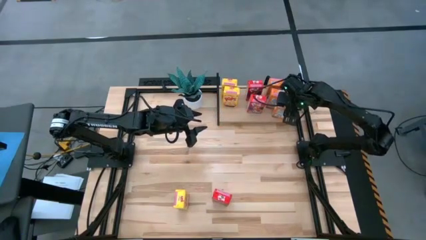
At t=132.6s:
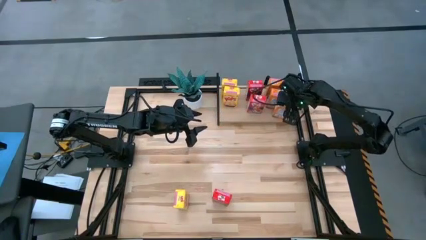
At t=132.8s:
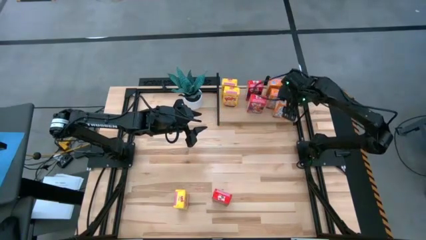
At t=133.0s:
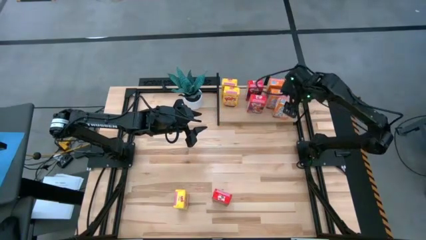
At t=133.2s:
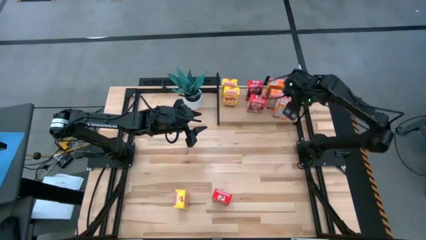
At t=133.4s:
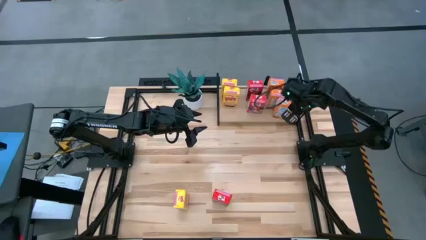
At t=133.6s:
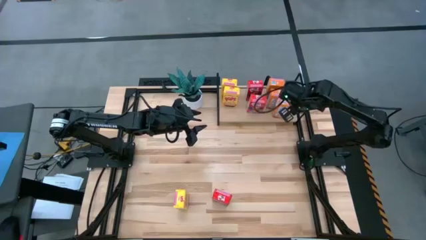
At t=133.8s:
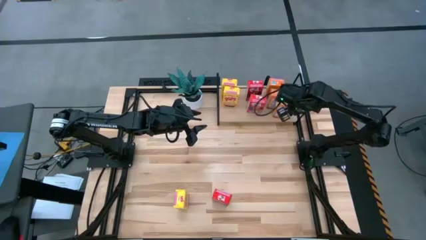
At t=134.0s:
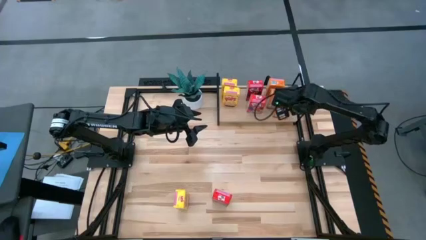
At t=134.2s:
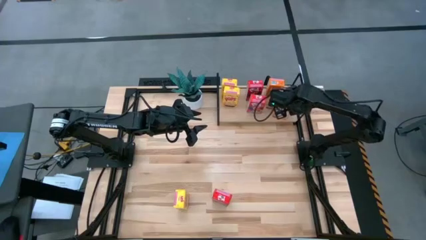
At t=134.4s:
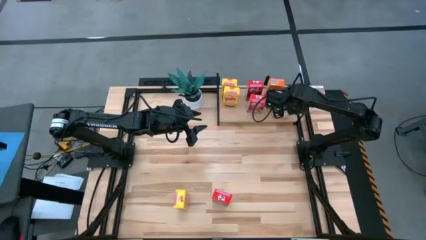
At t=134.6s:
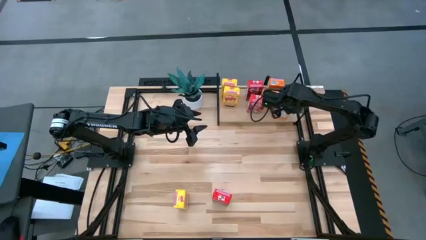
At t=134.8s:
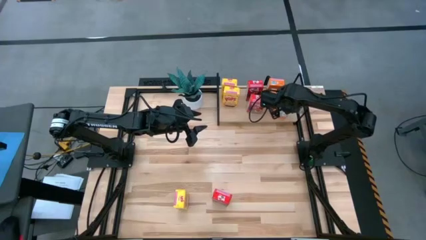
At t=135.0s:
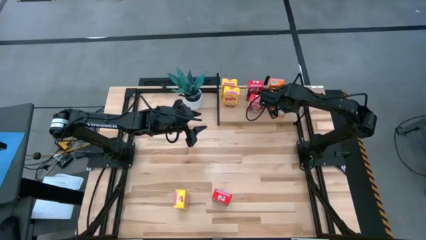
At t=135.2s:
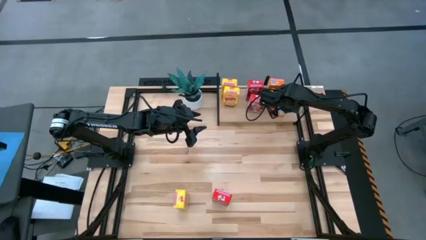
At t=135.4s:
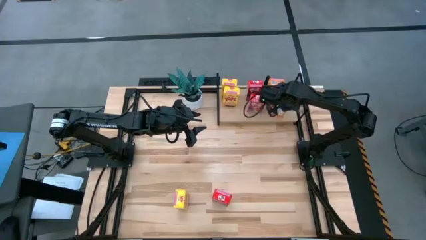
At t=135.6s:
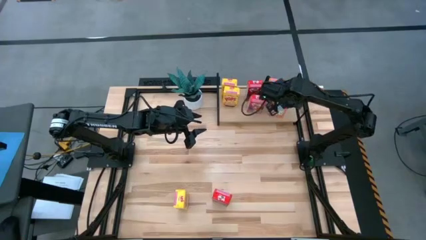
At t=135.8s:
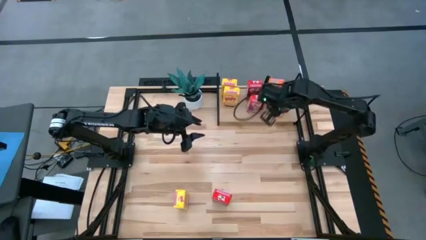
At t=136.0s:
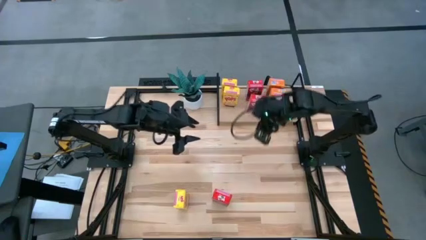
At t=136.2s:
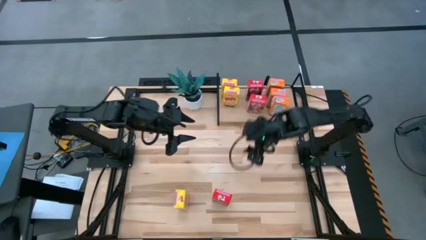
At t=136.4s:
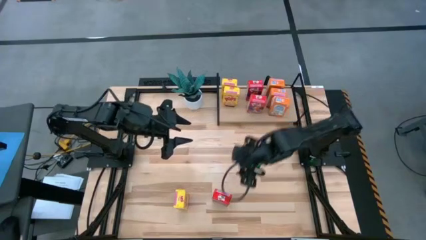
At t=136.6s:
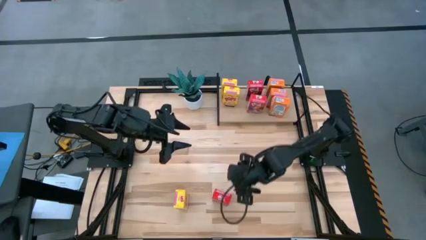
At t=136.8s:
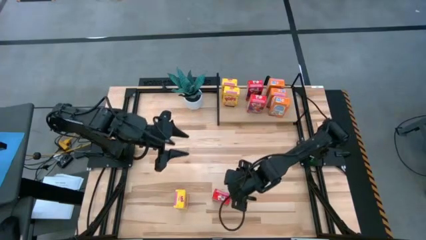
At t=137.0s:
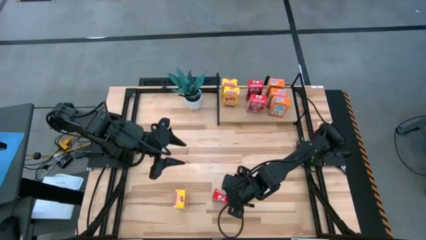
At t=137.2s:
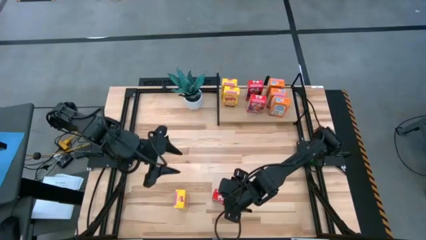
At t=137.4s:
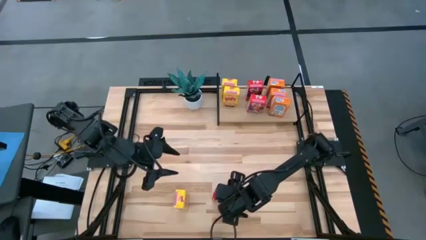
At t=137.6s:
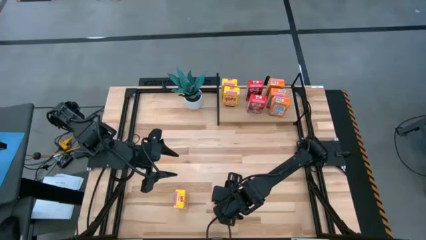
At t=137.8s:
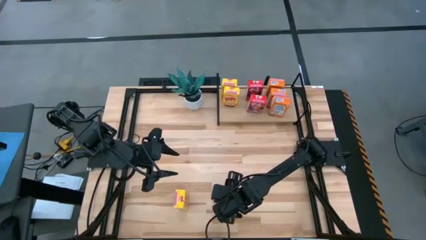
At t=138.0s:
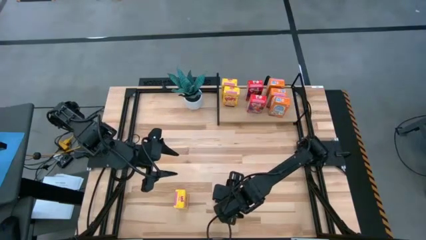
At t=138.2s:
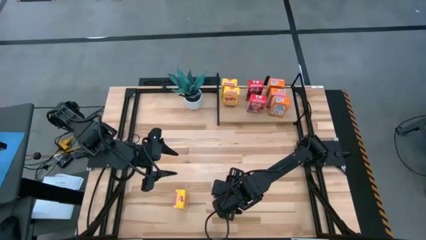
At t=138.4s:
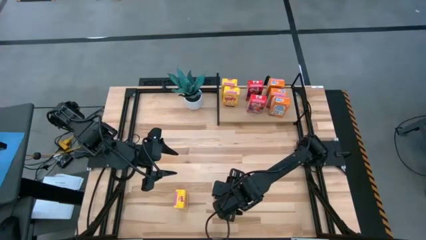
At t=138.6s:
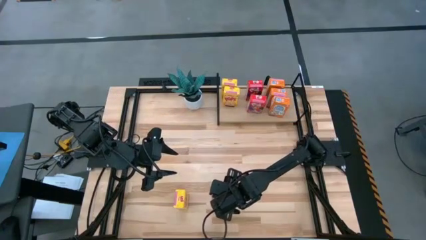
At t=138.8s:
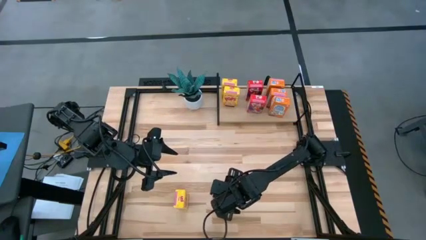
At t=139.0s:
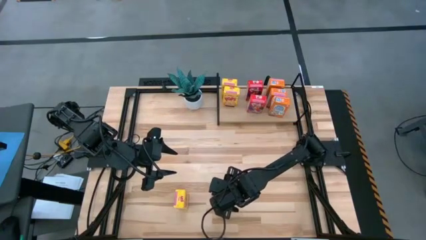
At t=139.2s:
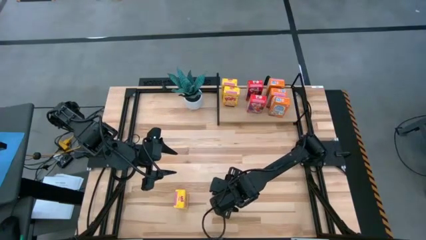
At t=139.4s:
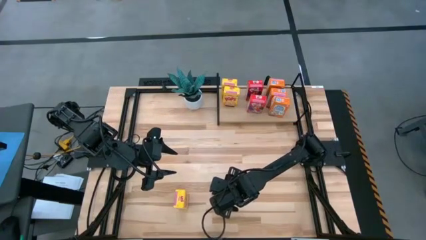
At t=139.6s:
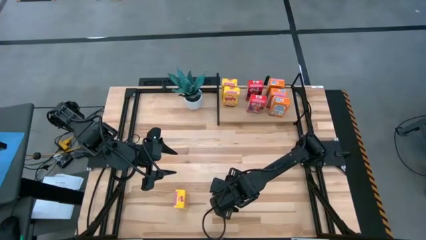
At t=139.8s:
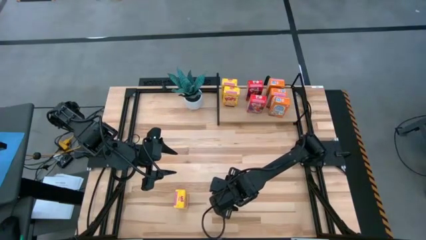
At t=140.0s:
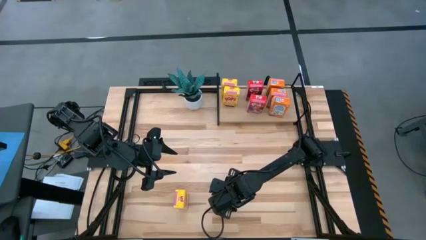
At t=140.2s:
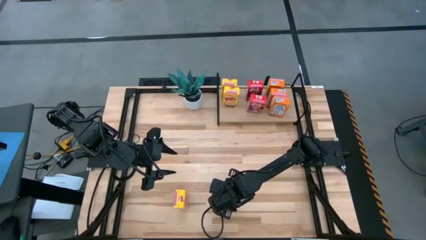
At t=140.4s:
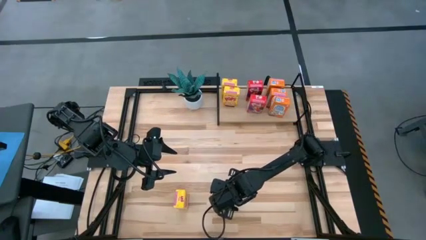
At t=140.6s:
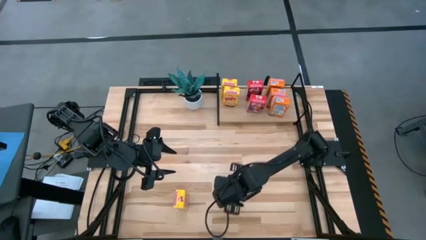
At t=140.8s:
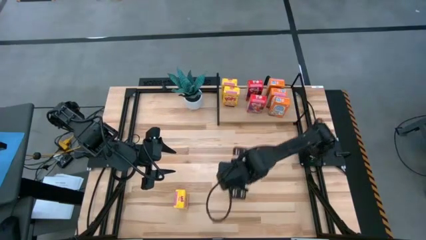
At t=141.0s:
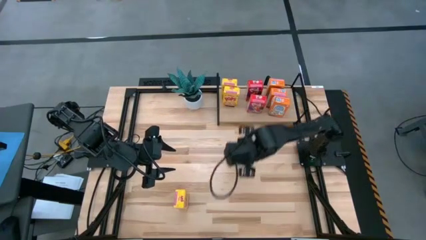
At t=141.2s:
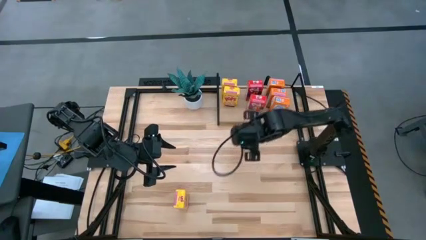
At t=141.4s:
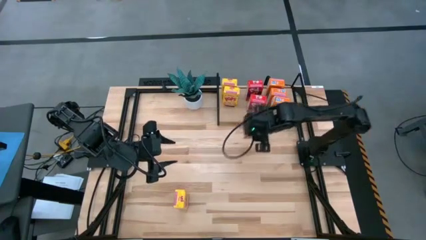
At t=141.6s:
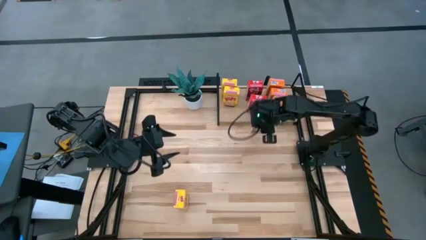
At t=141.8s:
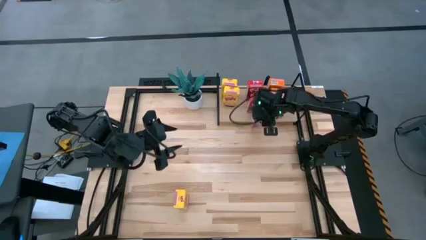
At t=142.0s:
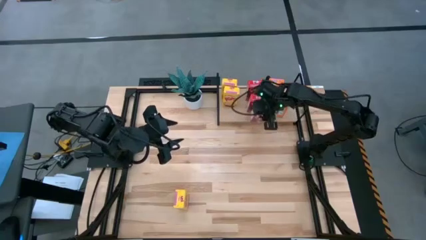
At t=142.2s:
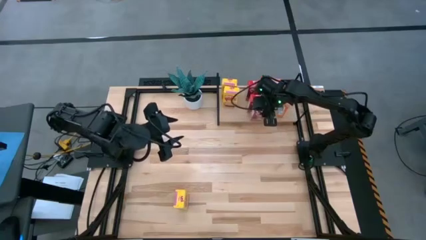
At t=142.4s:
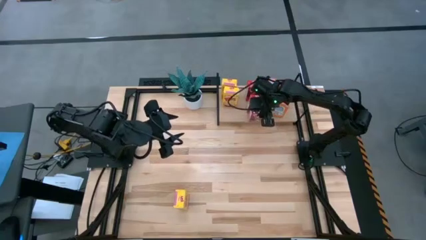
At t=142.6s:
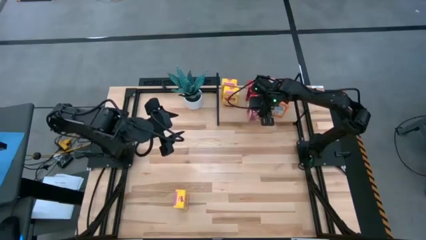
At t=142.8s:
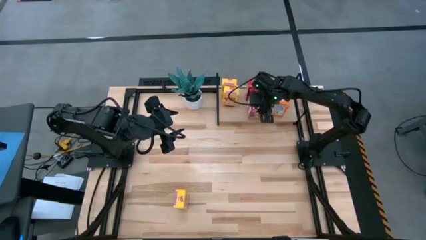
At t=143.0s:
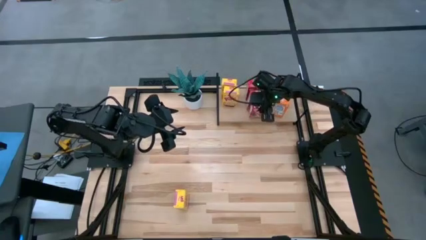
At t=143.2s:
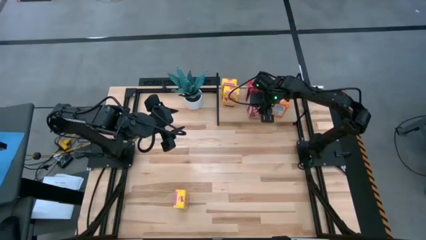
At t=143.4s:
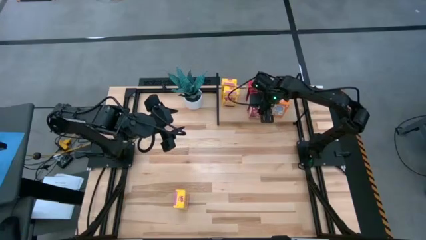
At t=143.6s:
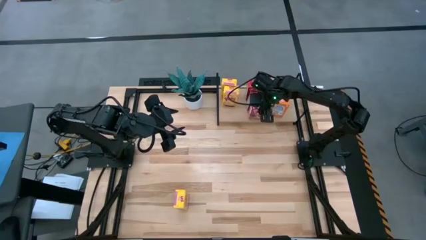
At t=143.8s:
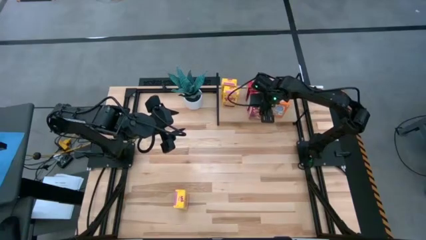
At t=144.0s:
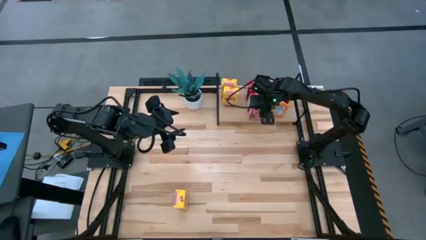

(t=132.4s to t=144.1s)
Task: Stack cereal on shelf
Put the red cereal box on the shelf aligned with the red cereal boxes

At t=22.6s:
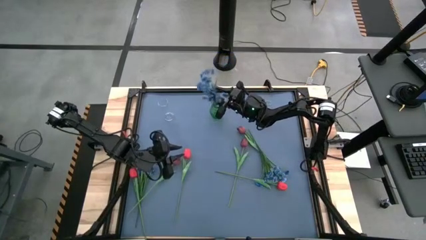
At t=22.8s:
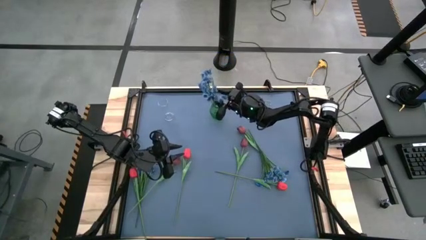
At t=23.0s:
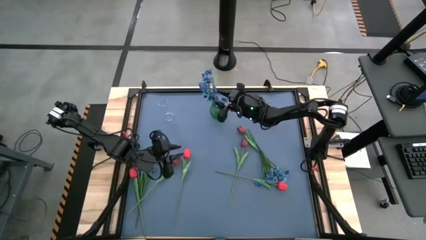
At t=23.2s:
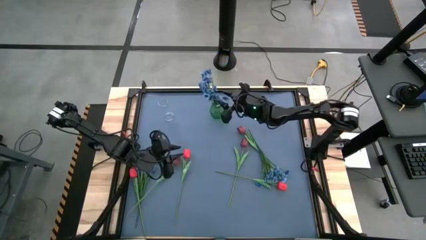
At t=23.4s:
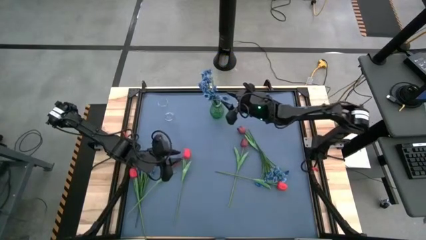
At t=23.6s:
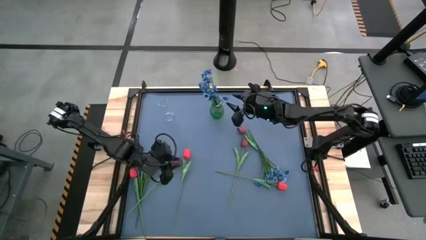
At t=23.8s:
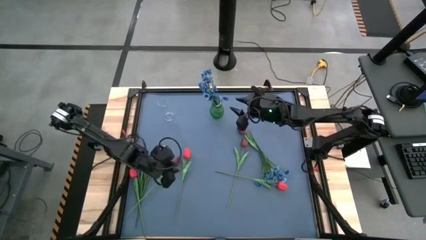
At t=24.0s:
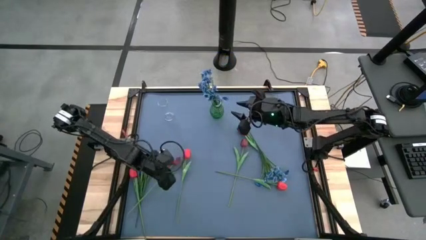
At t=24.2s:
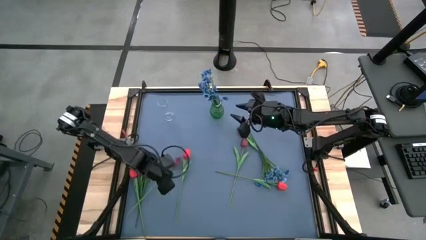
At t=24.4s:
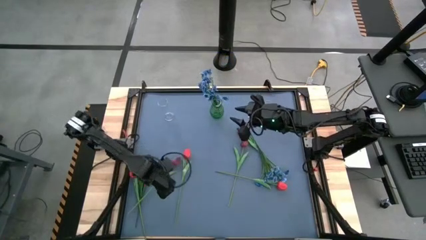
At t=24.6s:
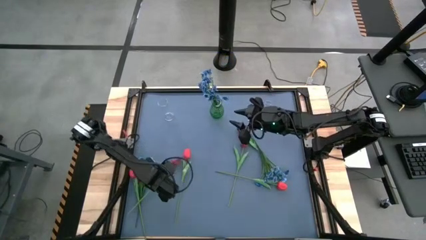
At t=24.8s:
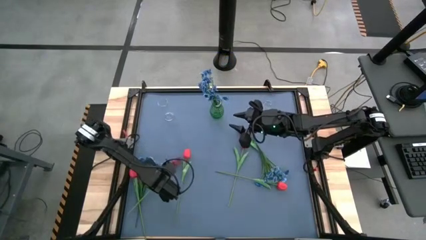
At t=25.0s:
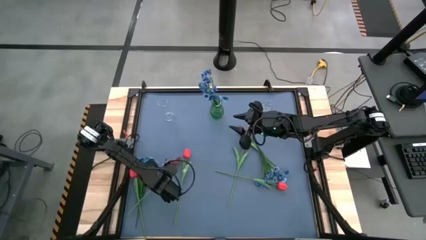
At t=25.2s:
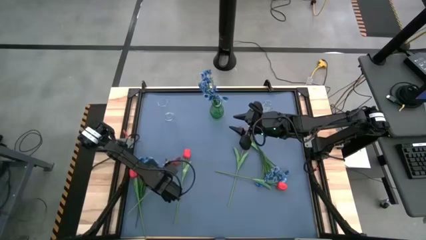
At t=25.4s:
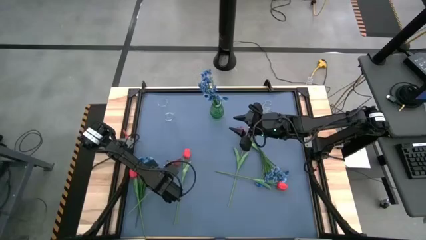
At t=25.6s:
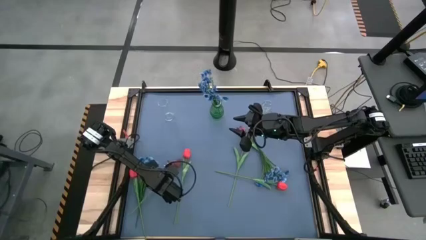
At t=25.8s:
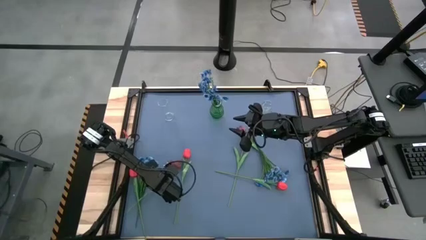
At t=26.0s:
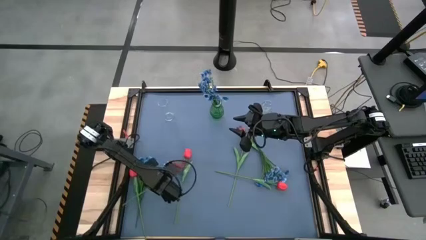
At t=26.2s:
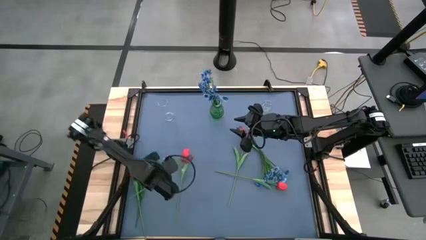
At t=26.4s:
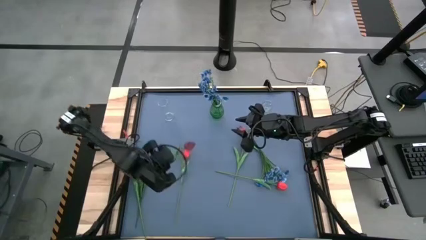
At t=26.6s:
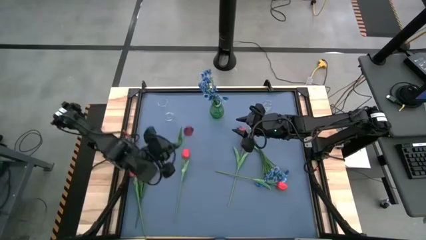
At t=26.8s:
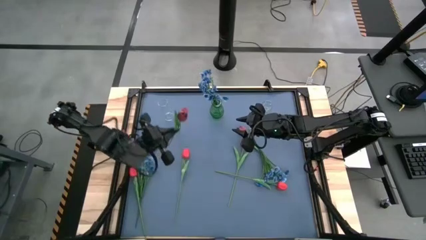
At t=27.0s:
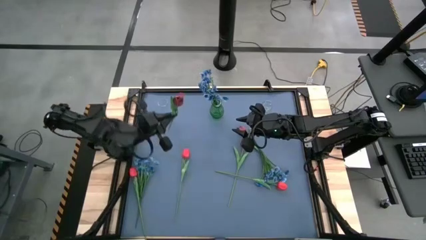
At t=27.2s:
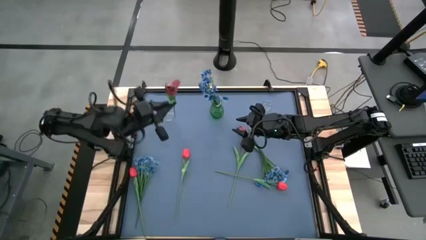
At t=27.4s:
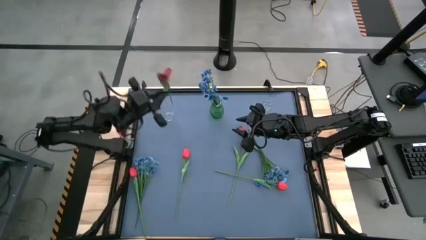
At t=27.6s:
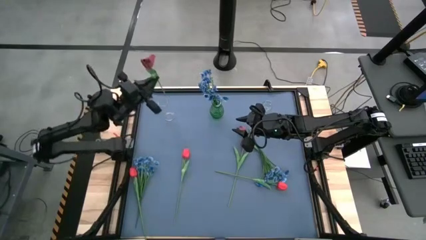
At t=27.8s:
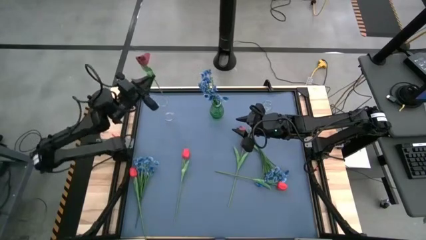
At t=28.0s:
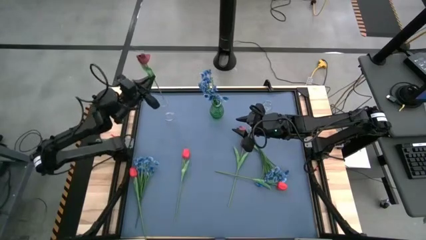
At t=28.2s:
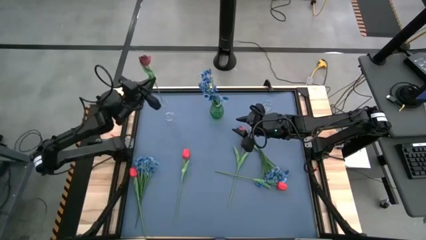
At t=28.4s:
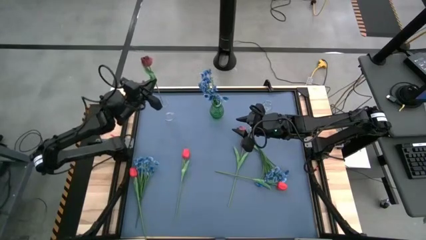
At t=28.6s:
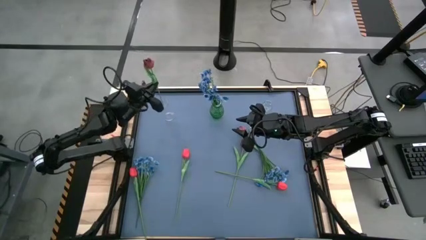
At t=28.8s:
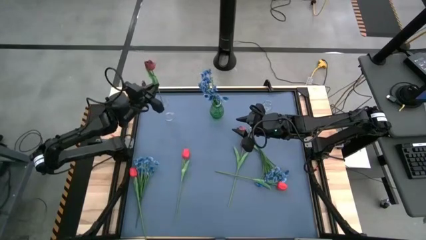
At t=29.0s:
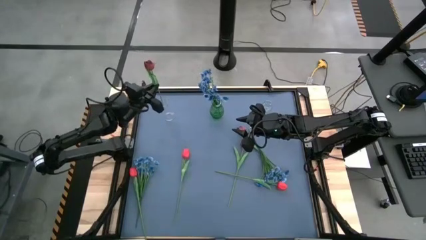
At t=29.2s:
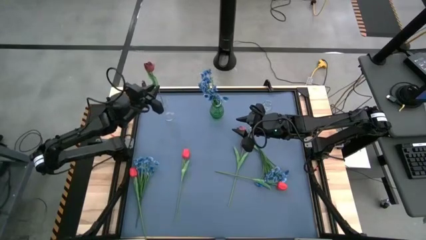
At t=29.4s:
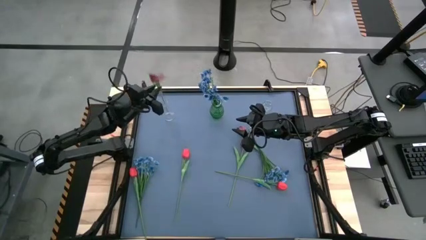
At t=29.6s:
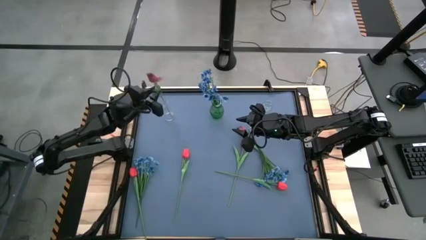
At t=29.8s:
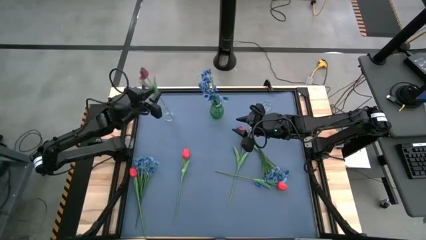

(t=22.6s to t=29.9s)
Task: Sort flowers into vase by color
Put the middle left red flower into the left transparent vase
